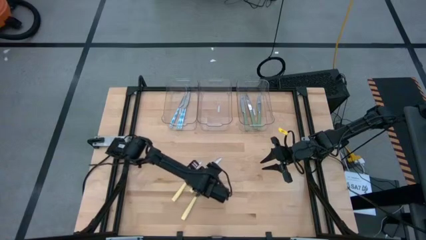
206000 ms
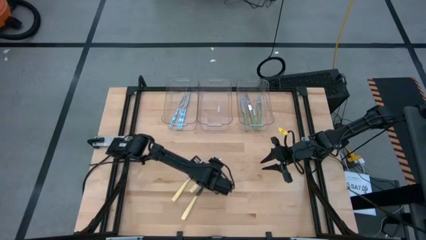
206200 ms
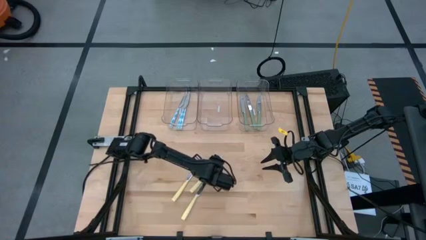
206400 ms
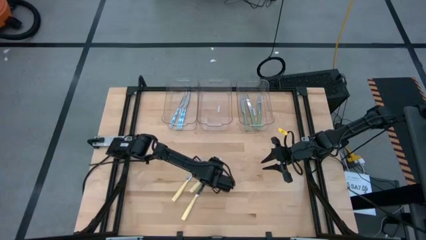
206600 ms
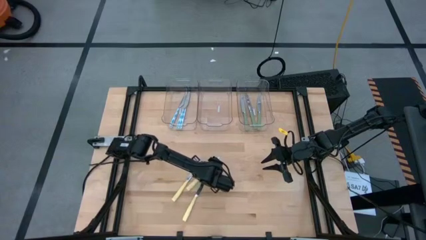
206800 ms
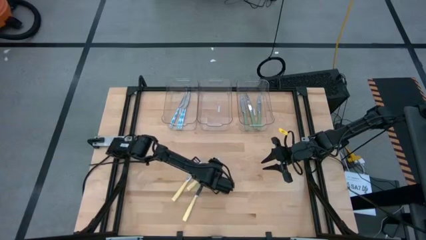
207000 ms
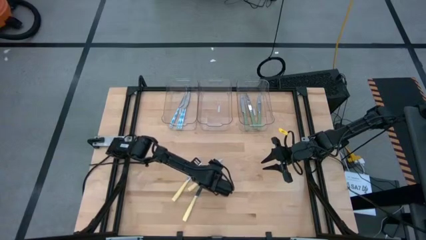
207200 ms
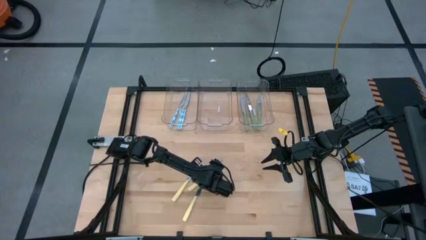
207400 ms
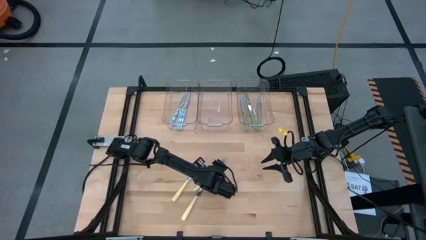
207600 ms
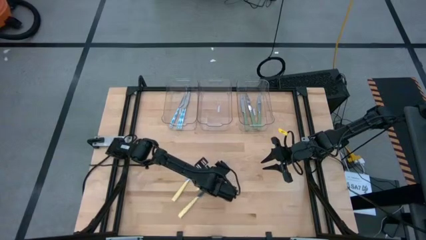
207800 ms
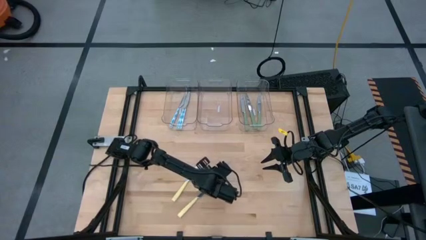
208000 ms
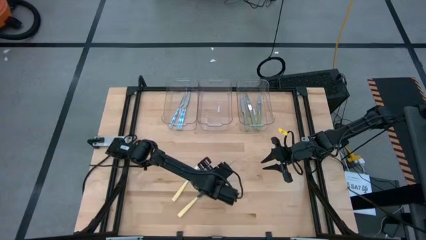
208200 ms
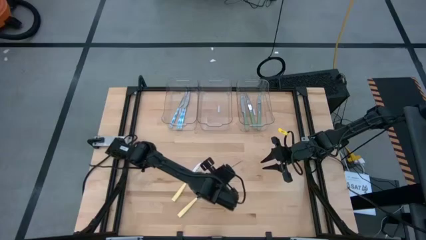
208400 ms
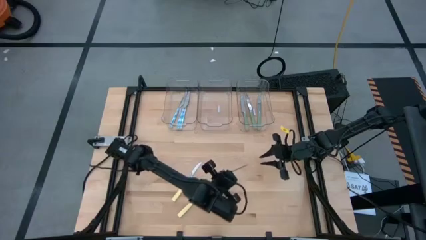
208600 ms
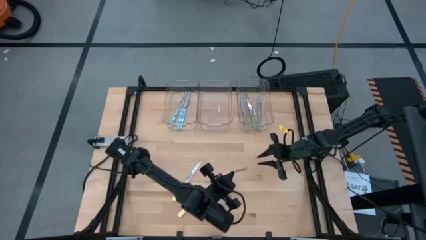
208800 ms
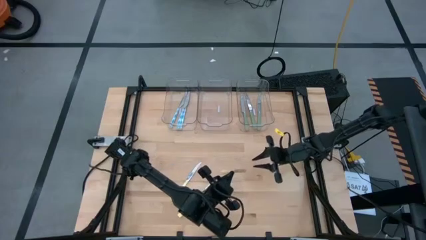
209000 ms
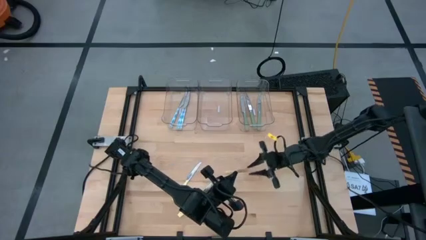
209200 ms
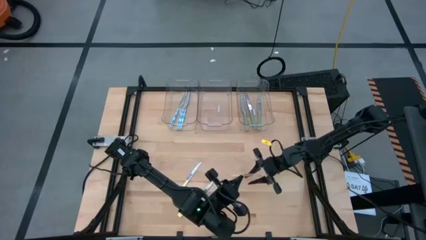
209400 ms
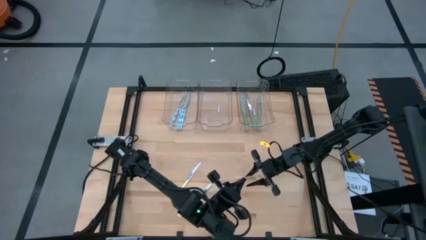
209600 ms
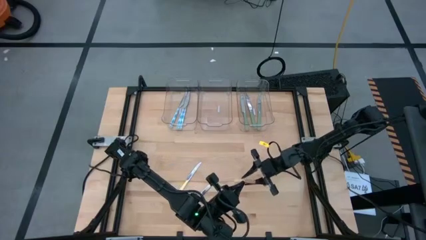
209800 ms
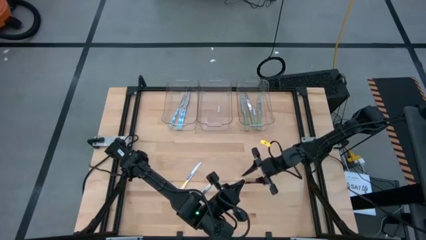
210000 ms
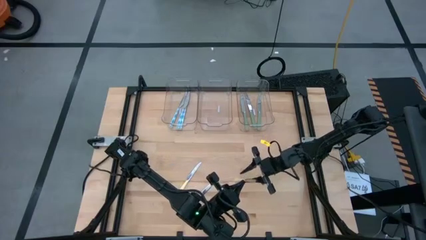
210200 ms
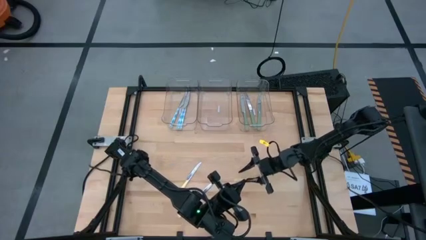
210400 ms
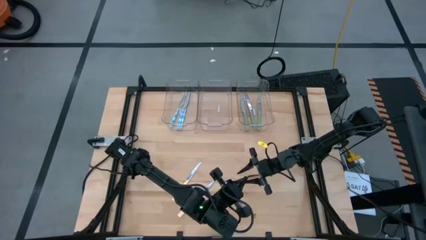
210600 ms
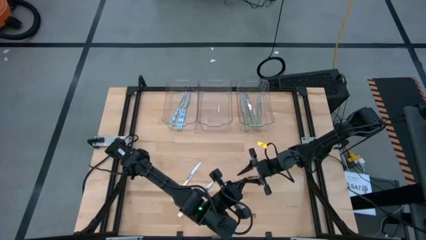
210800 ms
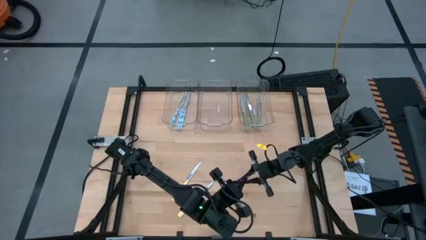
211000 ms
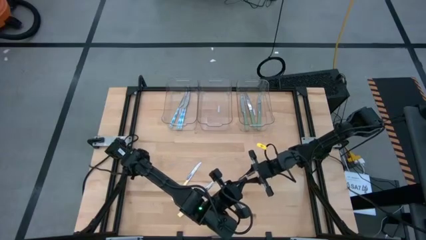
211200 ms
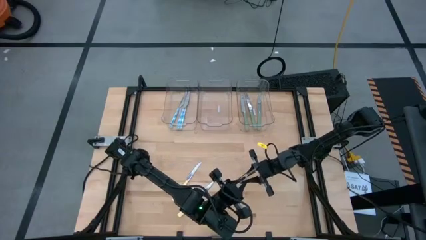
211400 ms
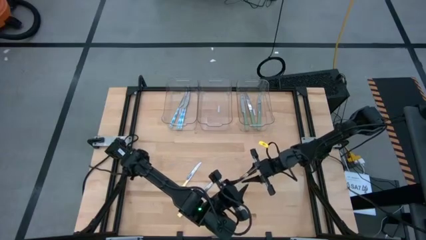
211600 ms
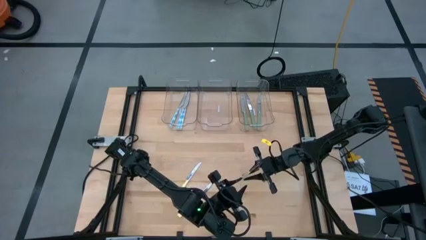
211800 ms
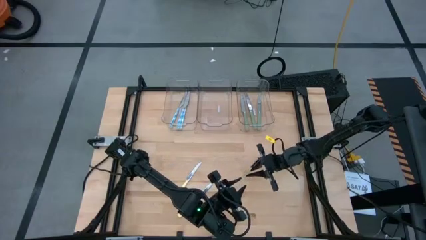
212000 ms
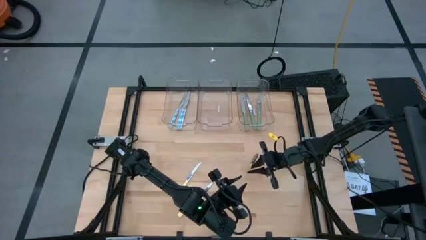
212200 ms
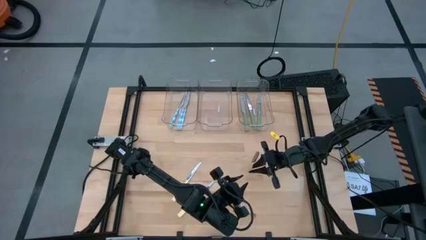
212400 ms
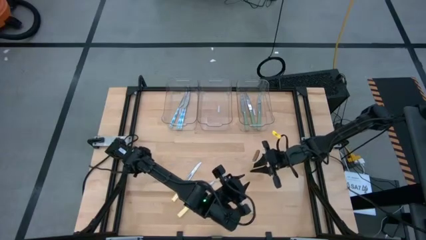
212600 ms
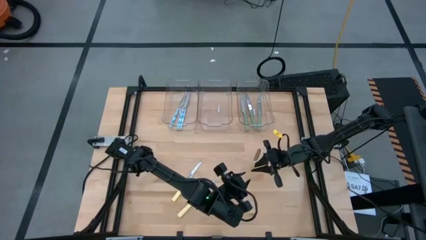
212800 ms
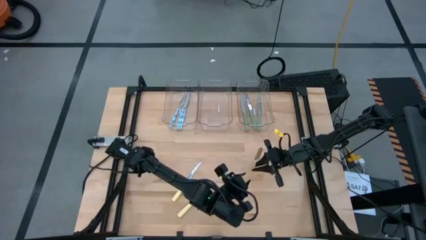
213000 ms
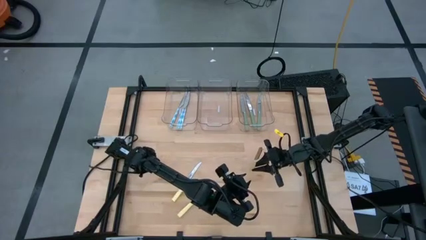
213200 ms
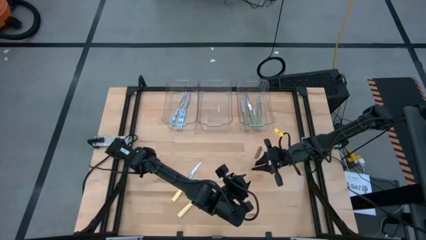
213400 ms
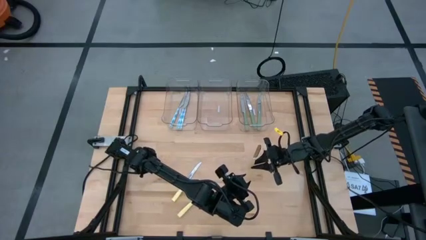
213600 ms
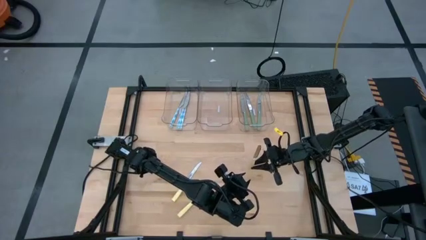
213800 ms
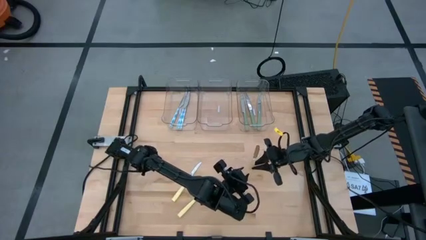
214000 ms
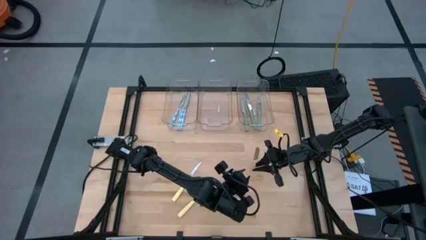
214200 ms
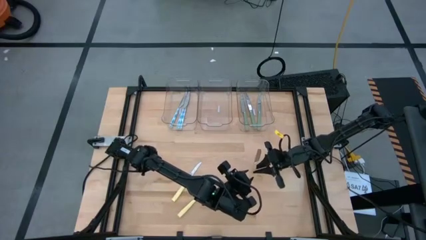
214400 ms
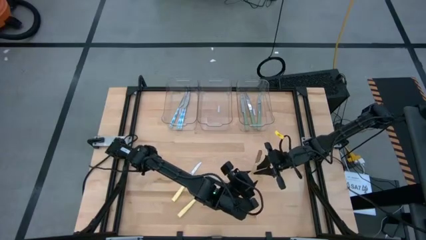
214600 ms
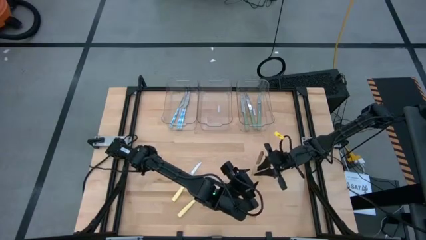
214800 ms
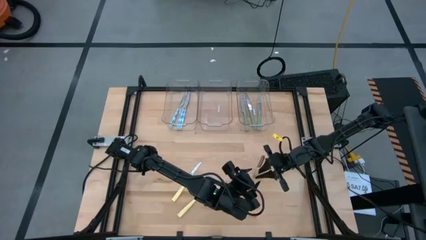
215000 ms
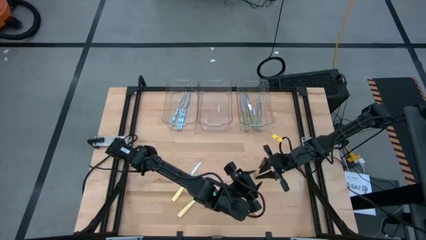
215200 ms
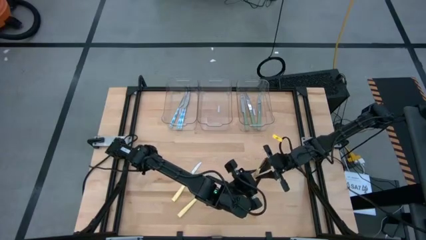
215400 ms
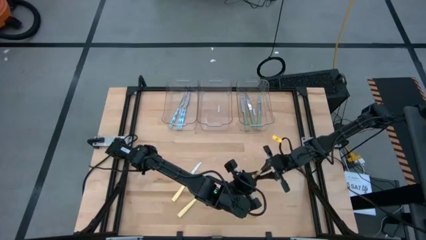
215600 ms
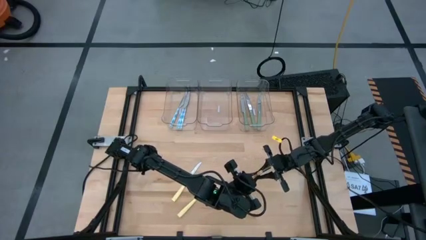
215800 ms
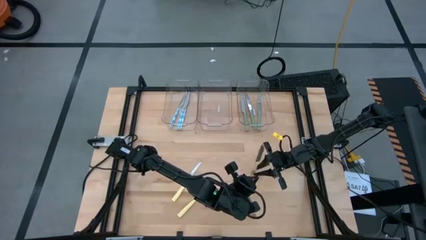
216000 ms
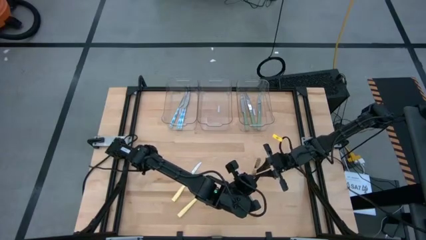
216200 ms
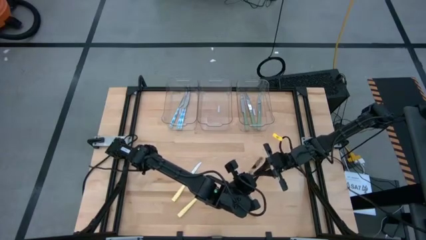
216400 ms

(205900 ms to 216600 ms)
Task: Sort silverware by color (type)
Put the yellow knife into the middle transparent bin

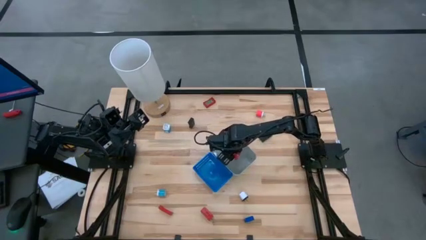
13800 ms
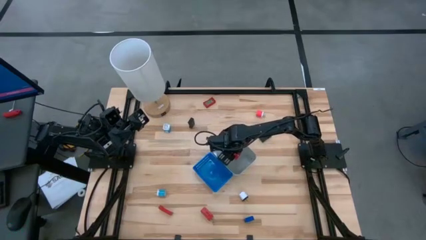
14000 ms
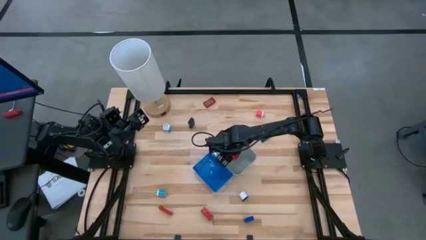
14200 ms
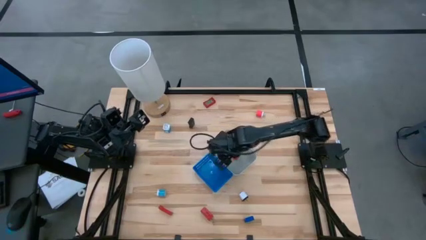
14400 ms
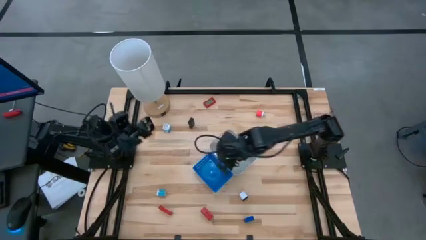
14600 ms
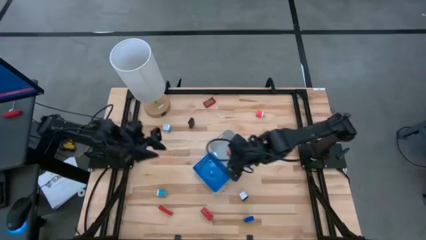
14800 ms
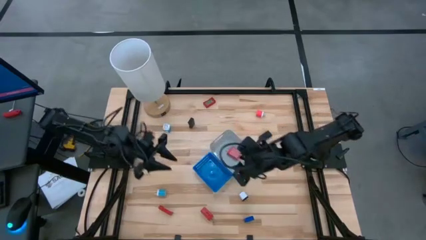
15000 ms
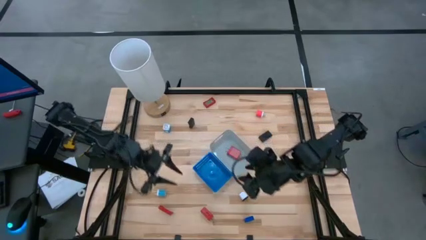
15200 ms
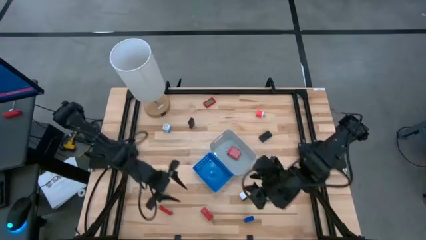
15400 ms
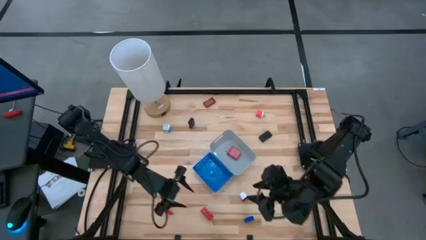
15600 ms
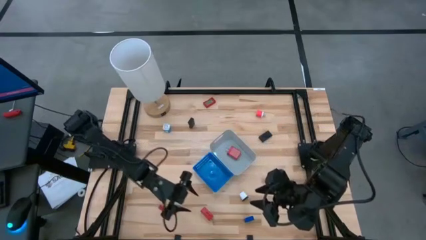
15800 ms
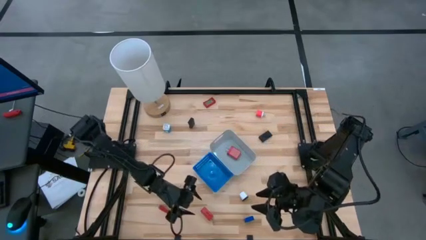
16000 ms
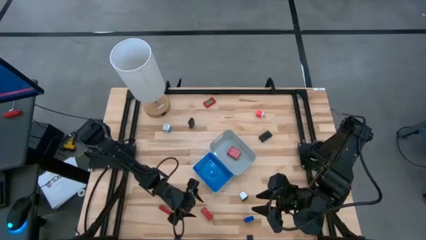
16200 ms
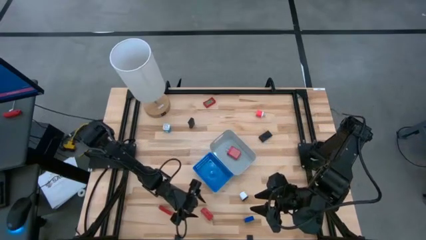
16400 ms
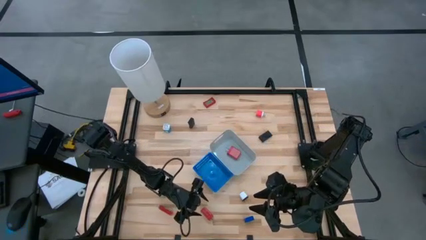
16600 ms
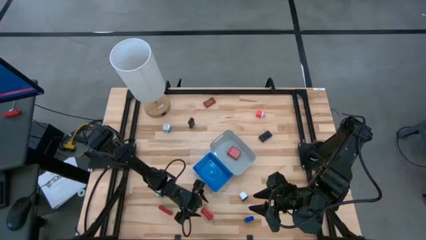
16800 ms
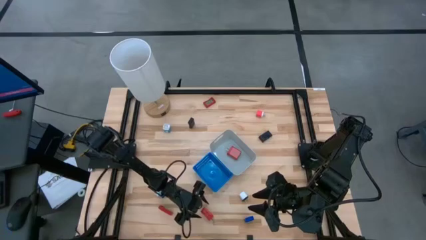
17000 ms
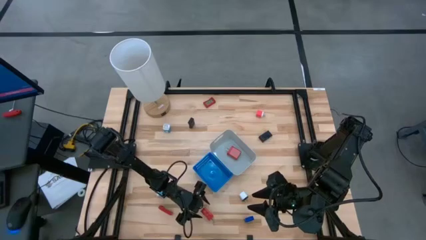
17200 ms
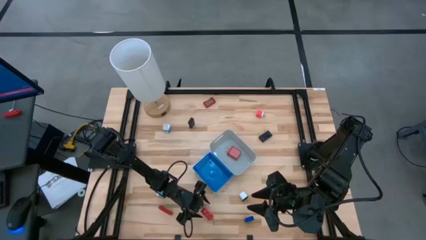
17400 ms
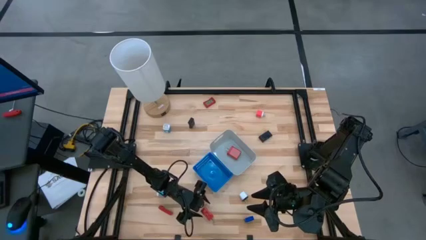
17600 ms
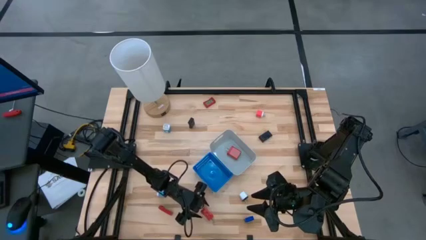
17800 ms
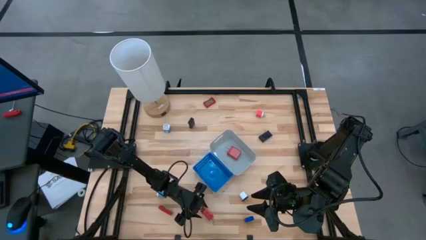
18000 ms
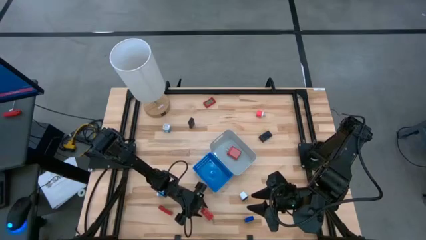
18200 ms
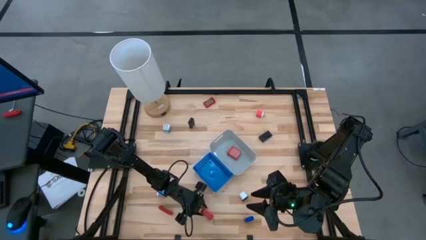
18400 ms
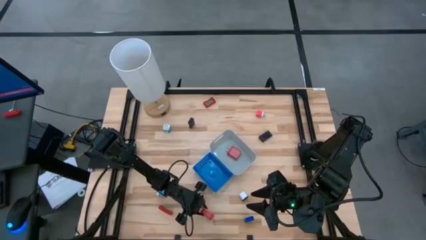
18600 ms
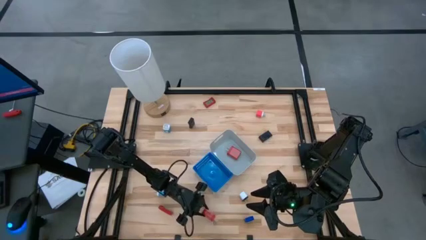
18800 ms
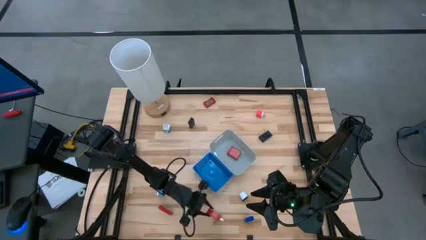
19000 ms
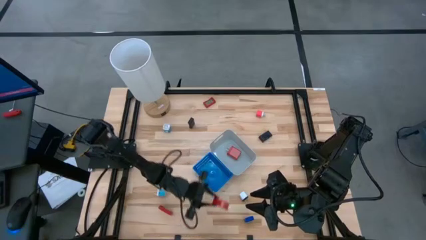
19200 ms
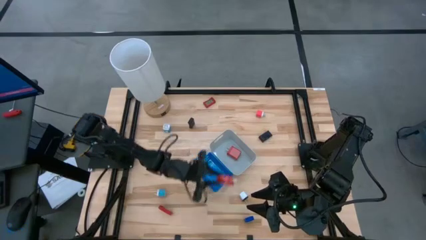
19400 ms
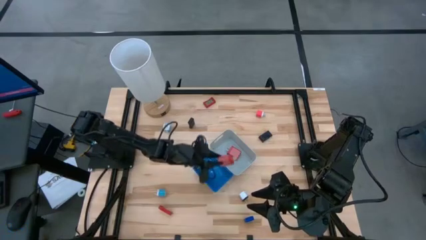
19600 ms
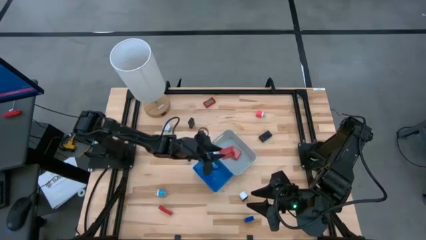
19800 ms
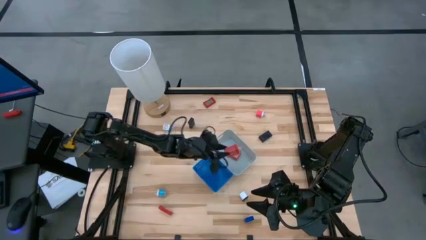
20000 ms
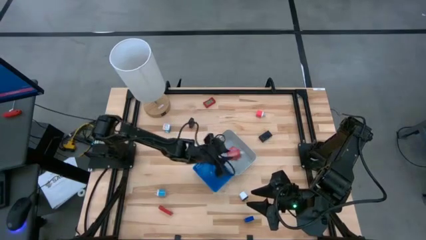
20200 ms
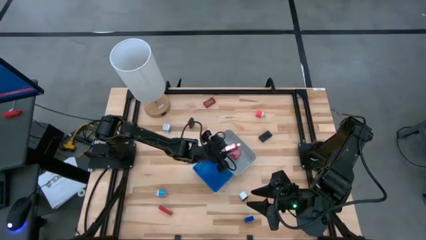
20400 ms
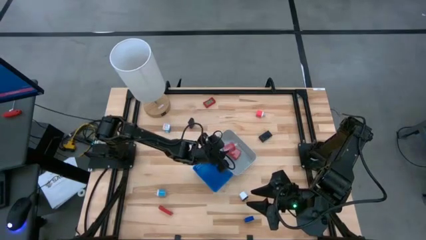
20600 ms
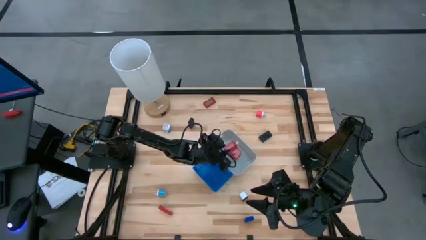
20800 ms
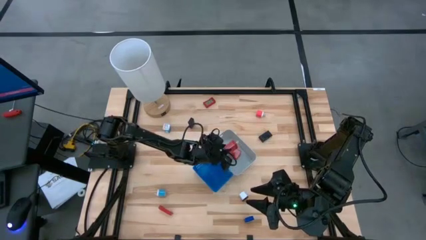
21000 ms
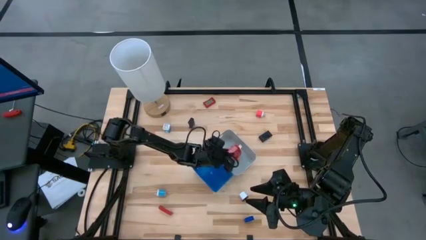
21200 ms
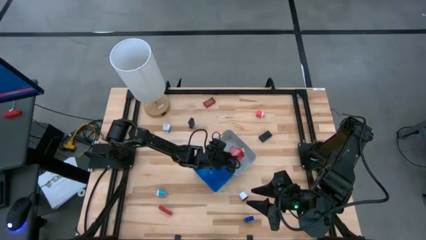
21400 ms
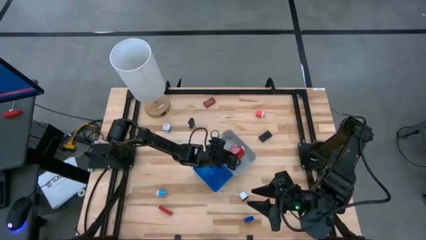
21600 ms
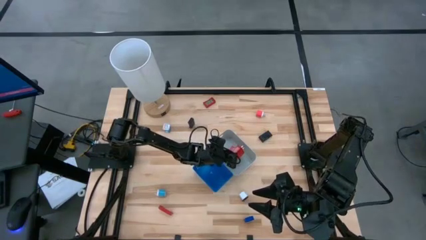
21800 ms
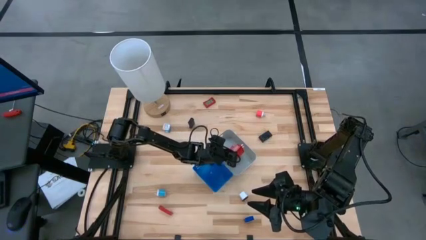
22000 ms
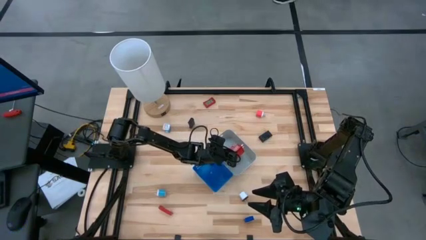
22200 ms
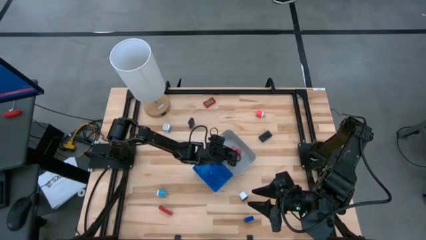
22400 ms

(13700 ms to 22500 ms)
Task: Pick & Place Office items
Put the red charger adapter into the gray bin
